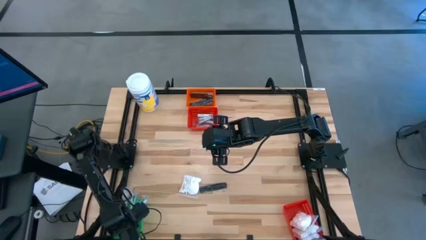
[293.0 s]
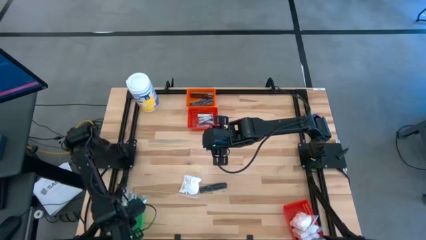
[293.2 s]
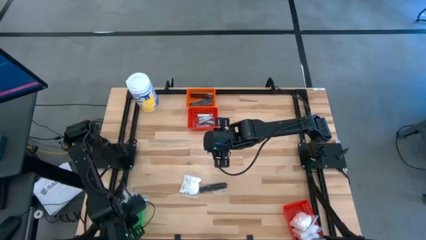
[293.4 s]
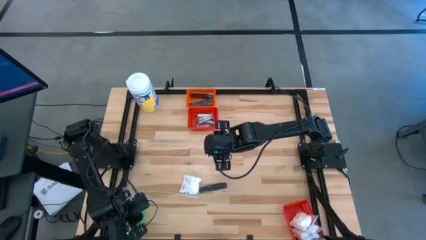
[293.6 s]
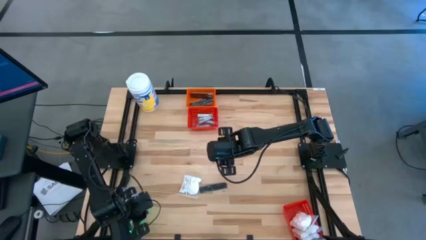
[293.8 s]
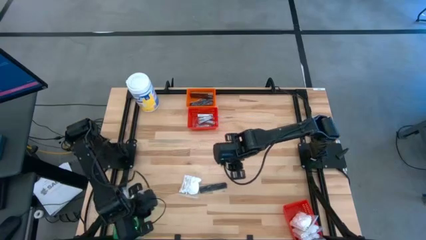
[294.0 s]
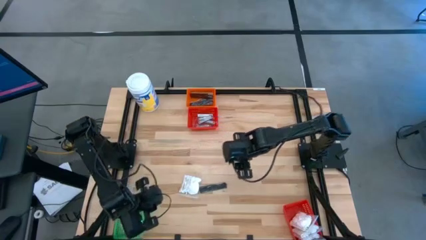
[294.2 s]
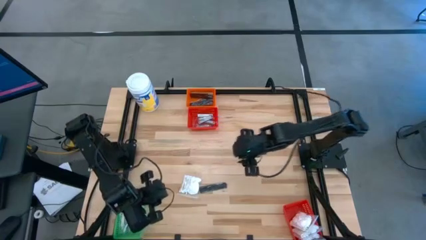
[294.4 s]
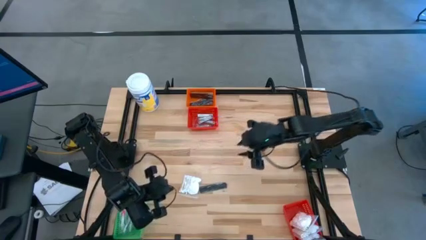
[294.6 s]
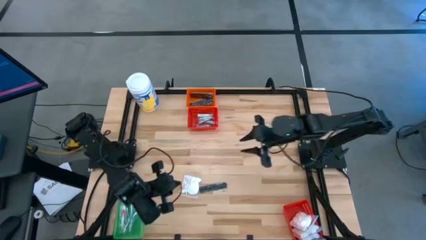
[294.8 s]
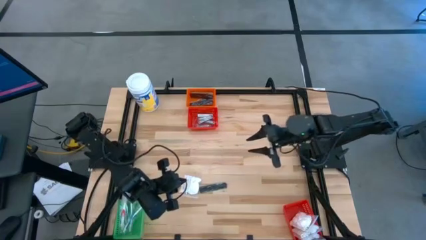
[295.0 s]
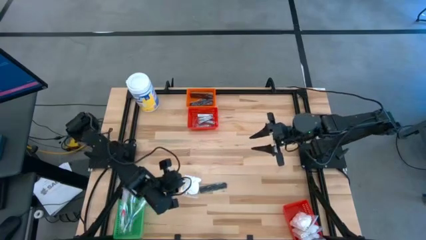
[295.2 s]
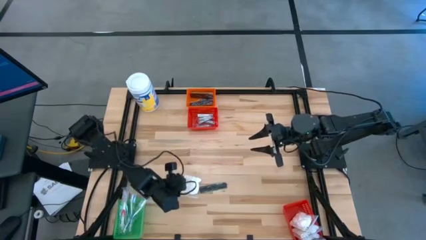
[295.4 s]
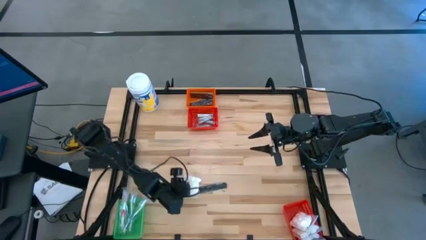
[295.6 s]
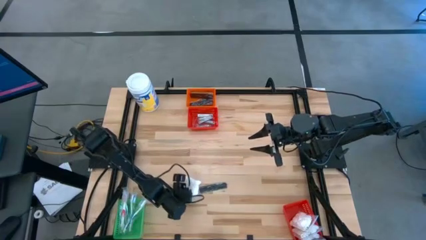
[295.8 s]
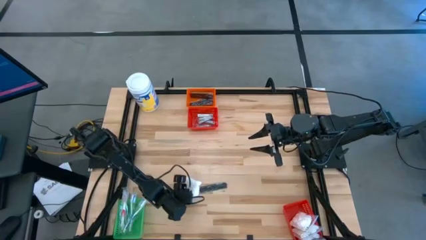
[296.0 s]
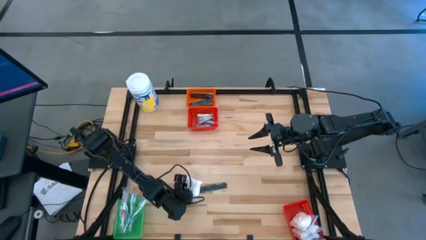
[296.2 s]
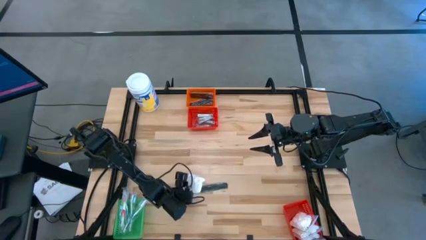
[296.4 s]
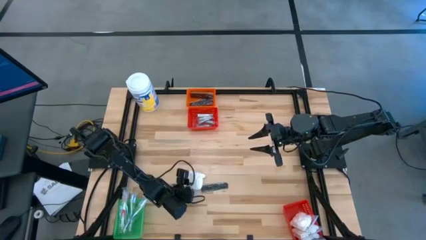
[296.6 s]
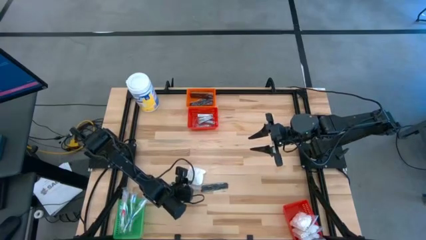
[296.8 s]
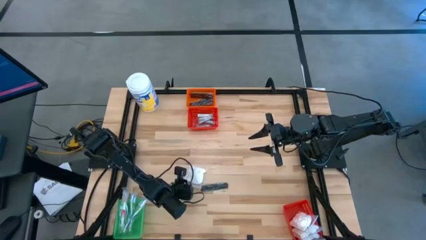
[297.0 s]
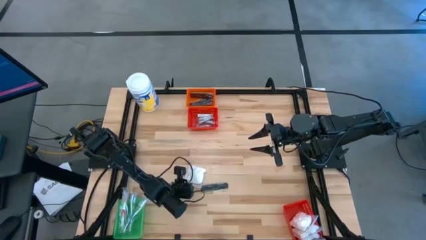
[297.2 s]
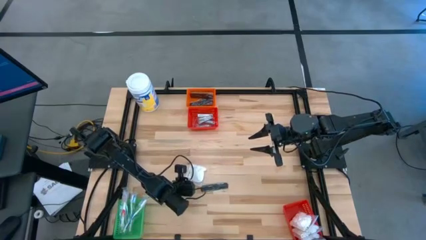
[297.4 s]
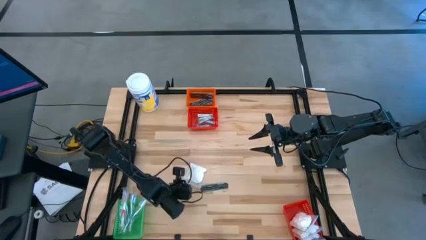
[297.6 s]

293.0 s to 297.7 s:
Task: Pick & Place Travel size toiletries
Put the cotton pack into the bottom red basket

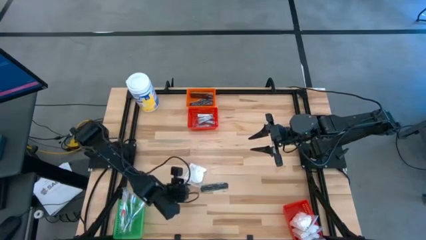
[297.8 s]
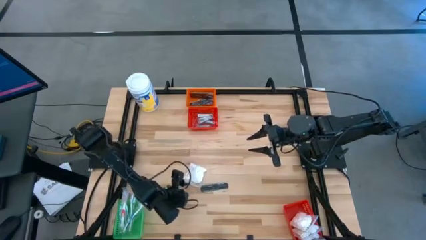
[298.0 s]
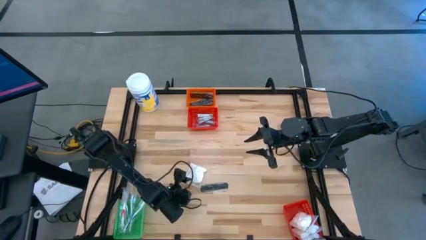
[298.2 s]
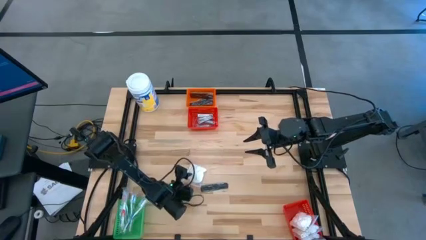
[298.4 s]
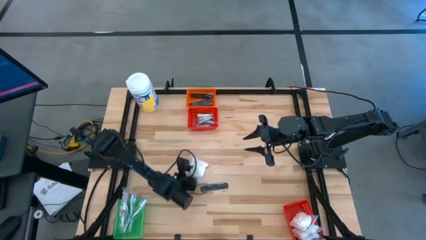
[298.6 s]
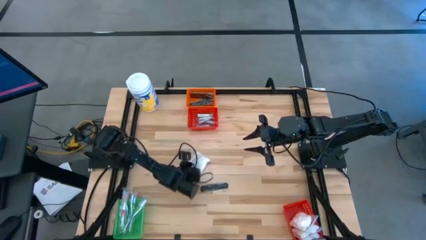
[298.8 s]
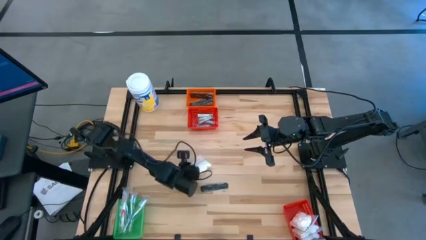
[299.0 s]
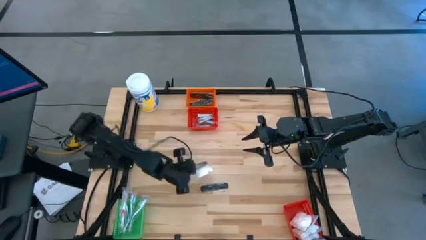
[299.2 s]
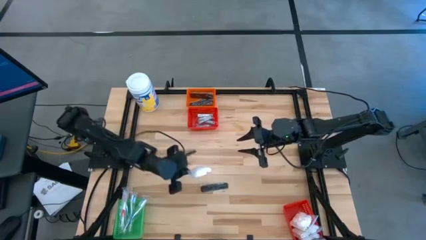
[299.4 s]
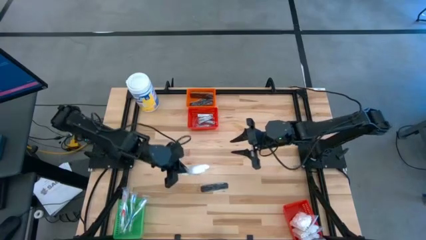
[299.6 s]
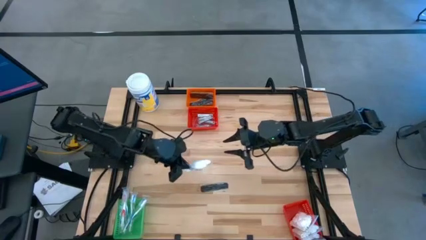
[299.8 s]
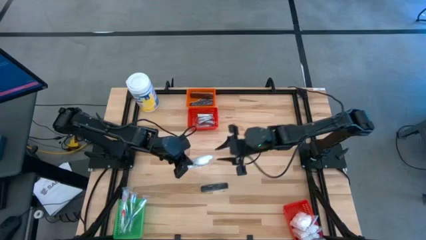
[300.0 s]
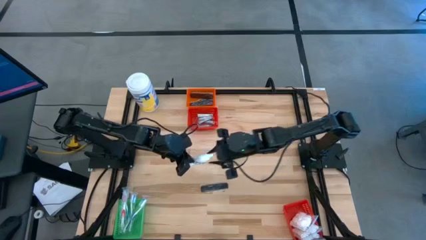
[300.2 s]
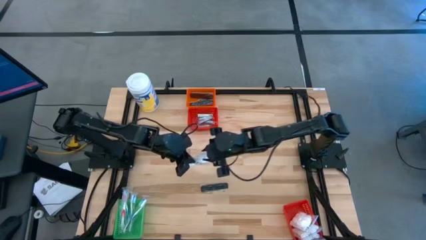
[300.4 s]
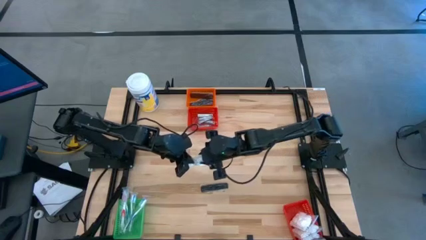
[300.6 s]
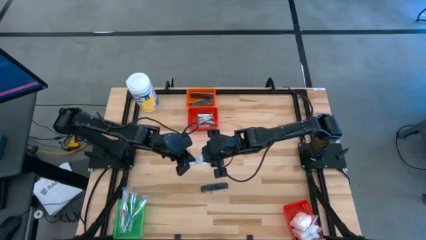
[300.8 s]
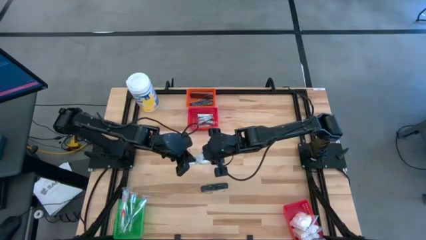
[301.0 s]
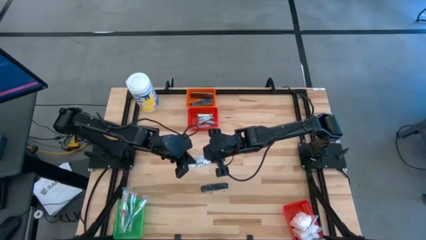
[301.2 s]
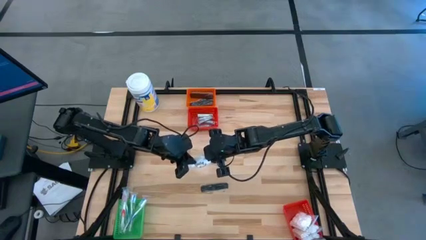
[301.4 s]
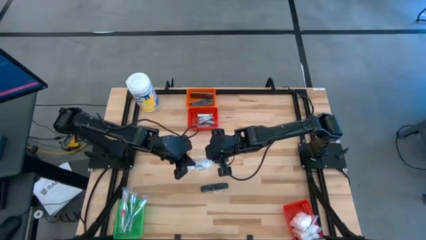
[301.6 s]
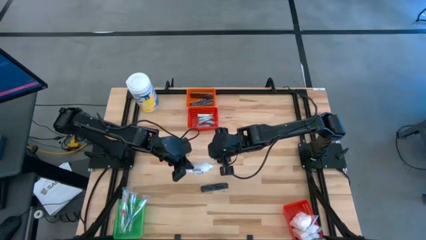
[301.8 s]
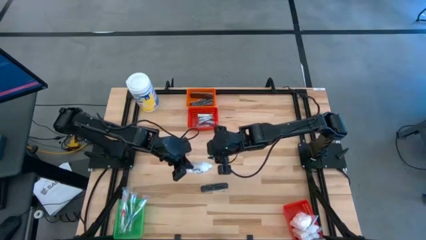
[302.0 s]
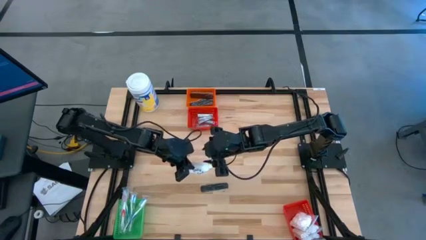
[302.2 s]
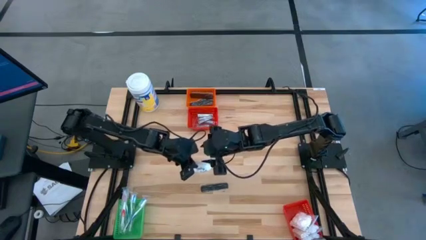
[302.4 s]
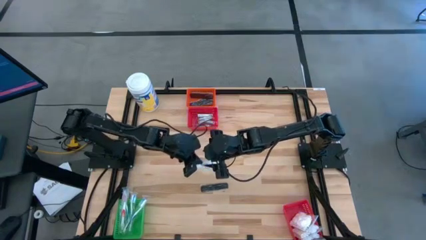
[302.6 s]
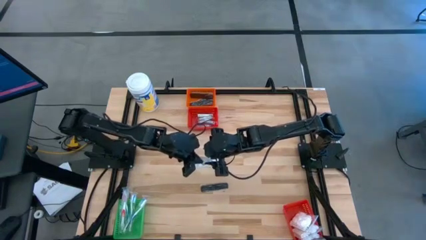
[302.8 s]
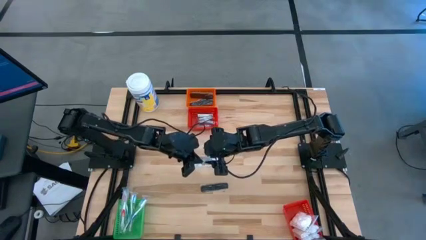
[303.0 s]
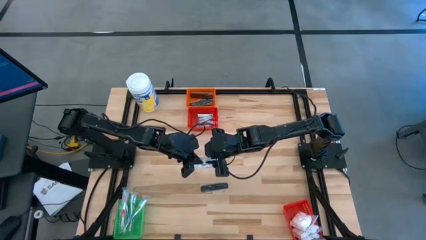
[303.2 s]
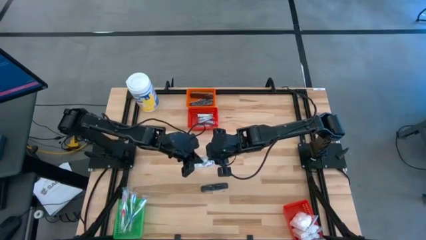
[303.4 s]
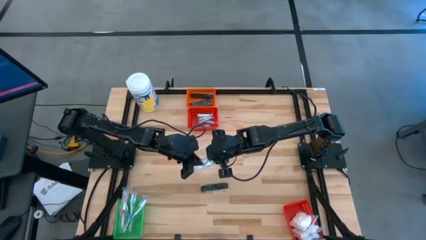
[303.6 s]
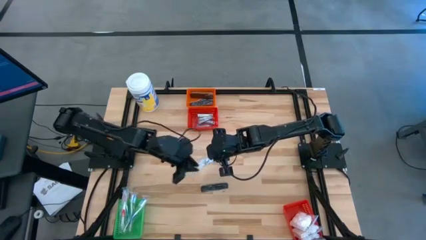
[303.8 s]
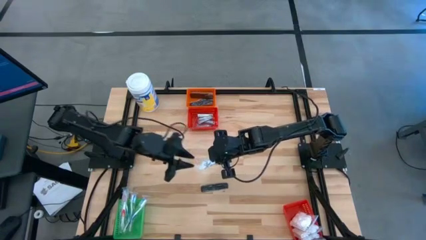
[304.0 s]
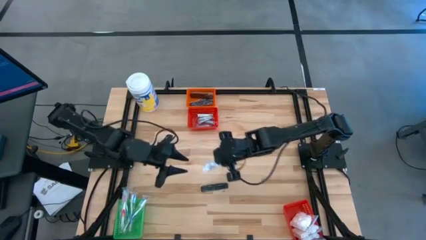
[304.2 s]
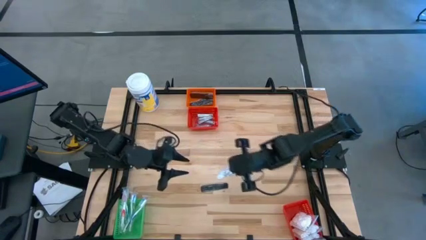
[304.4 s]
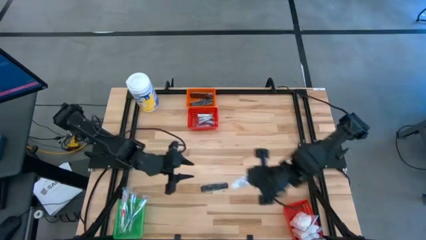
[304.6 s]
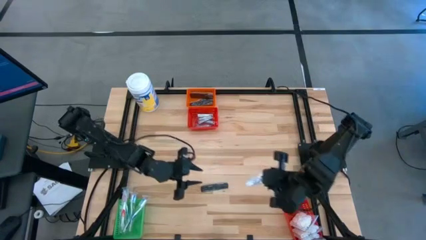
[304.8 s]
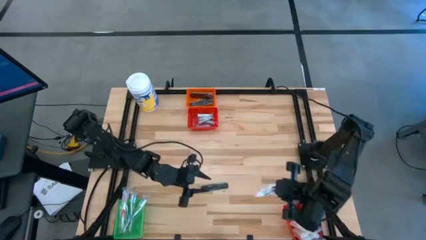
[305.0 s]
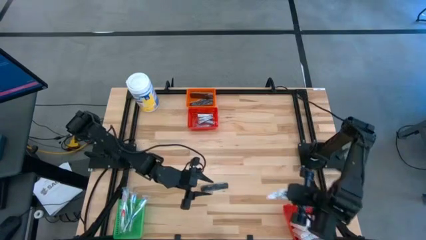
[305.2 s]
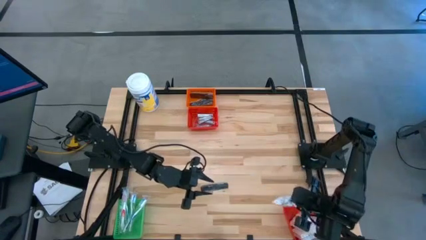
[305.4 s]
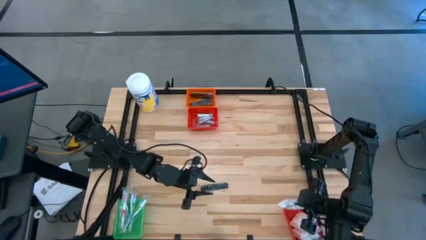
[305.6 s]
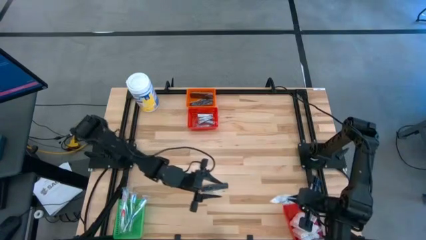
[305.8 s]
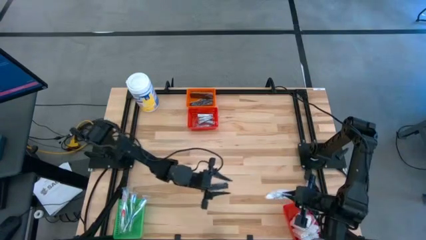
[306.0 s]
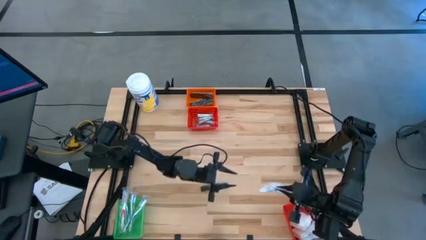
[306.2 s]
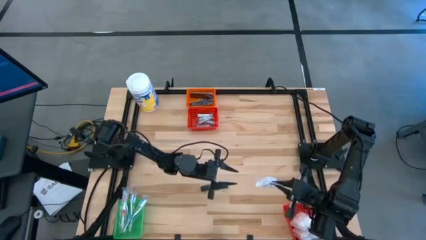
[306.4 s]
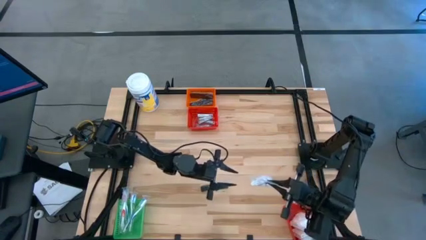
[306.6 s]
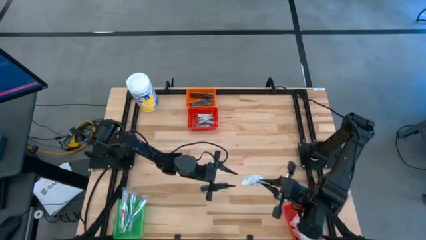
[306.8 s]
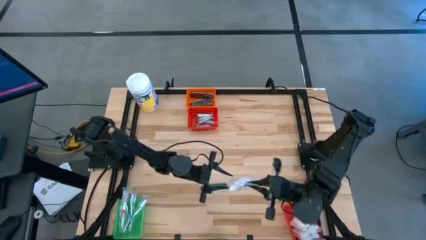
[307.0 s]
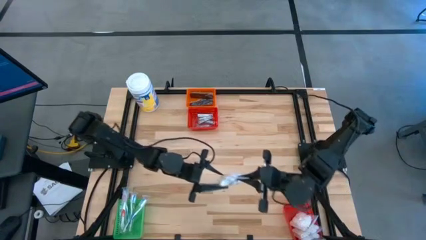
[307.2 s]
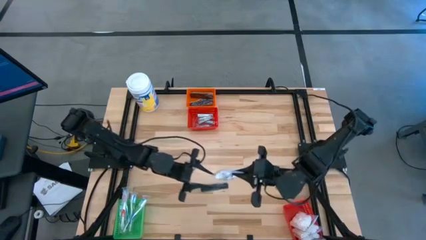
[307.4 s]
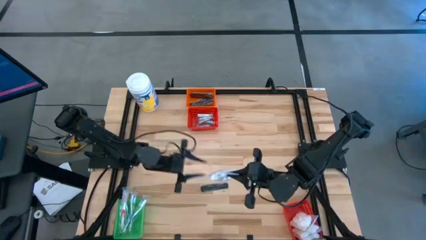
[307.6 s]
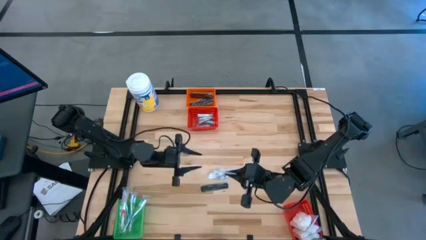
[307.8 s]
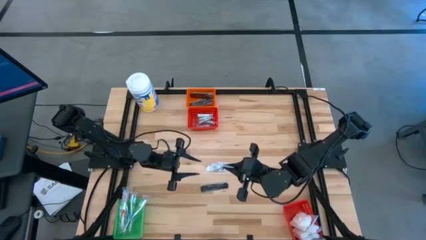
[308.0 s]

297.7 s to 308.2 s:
Put the cotton pack into the bottom red basket

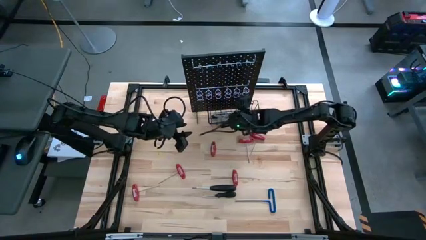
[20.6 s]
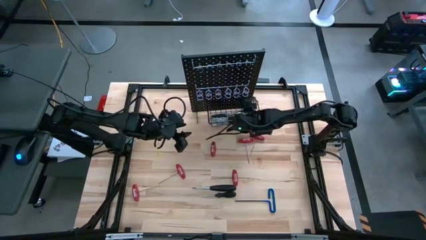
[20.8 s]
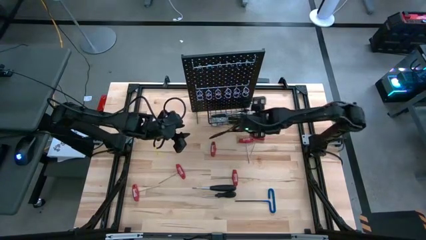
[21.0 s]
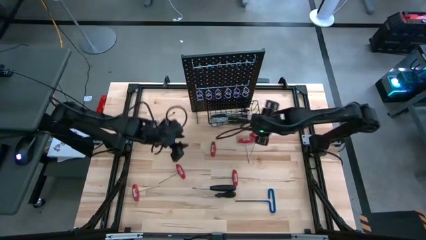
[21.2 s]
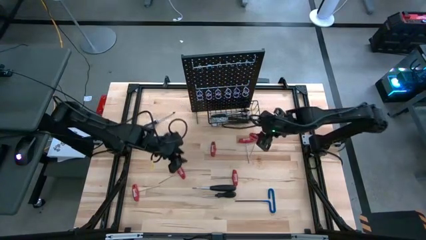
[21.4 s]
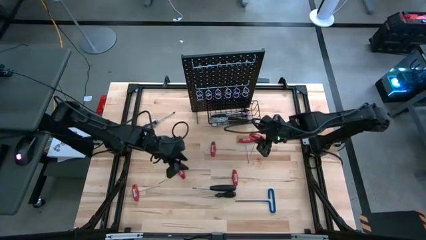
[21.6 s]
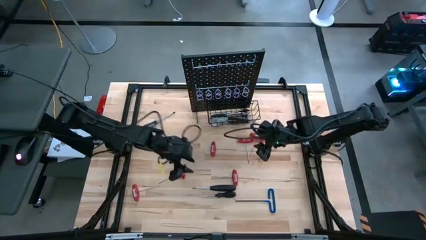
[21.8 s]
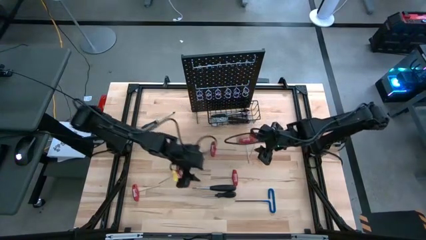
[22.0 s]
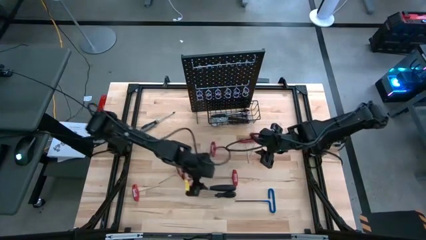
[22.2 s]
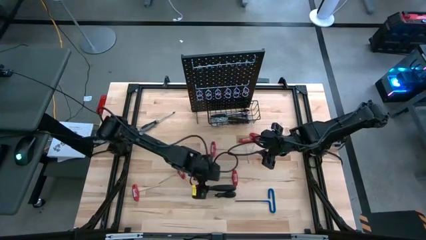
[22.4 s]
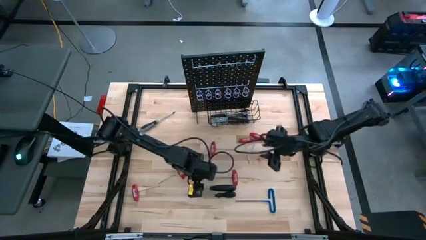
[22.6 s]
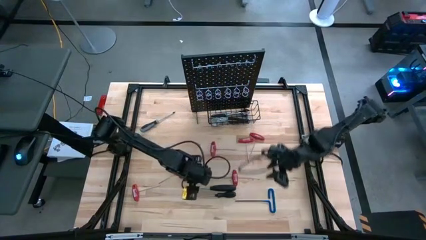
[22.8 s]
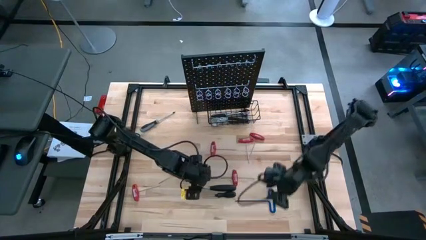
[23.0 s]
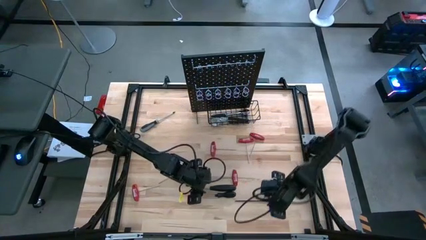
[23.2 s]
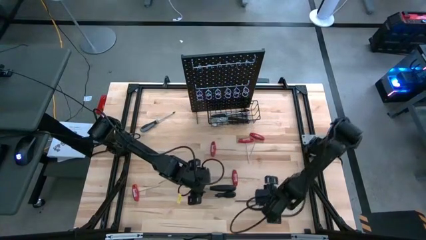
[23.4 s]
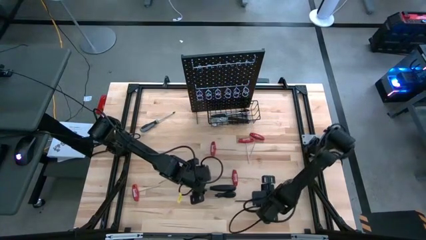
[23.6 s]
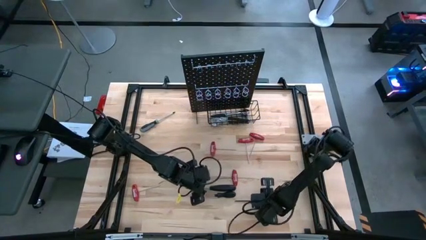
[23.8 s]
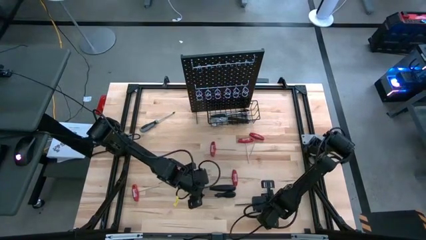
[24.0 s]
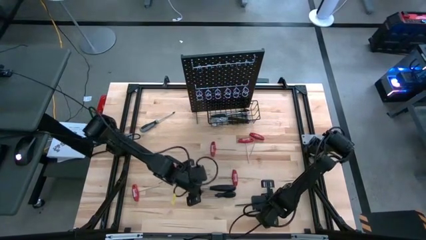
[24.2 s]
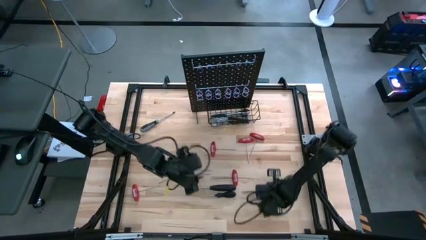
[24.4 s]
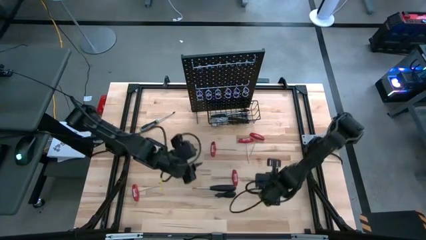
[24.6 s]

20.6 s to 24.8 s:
Task: Hang tools onto peg board
Hang the blue pick tool on the pegboard
